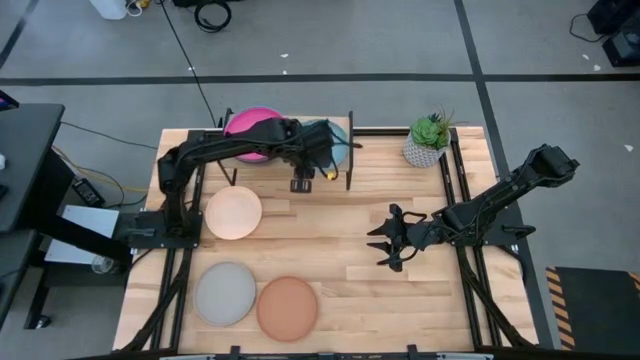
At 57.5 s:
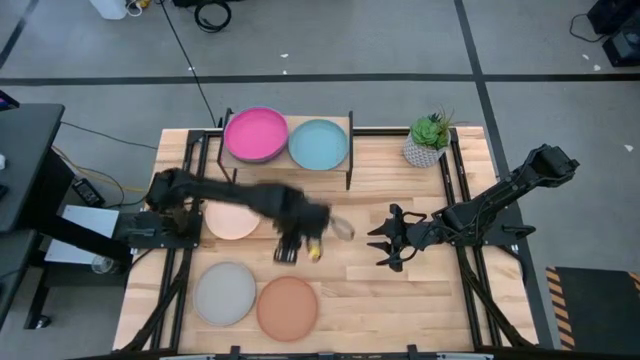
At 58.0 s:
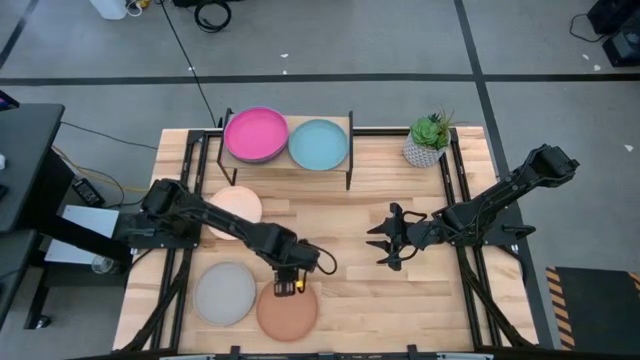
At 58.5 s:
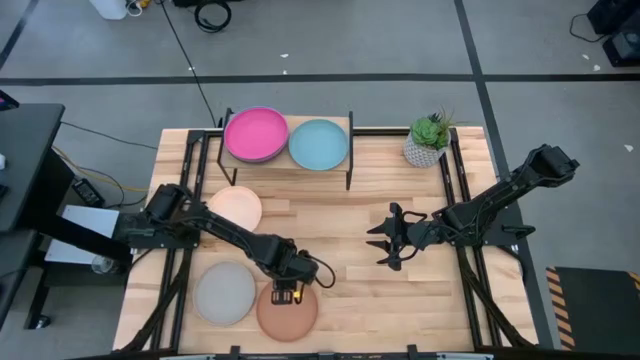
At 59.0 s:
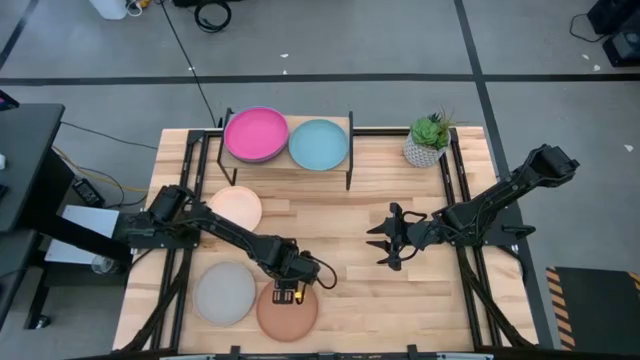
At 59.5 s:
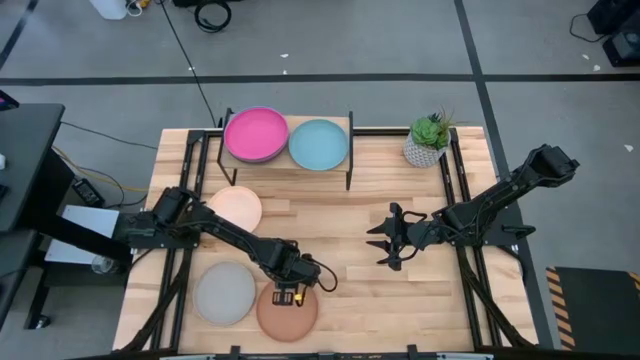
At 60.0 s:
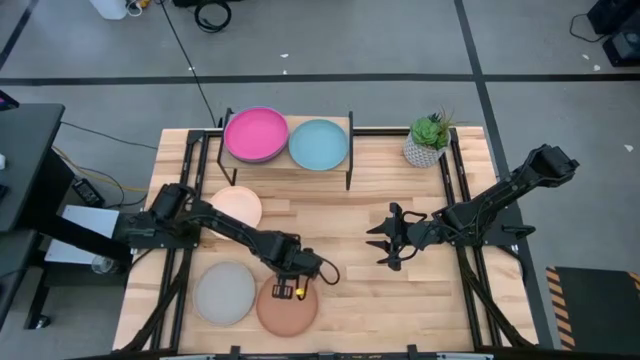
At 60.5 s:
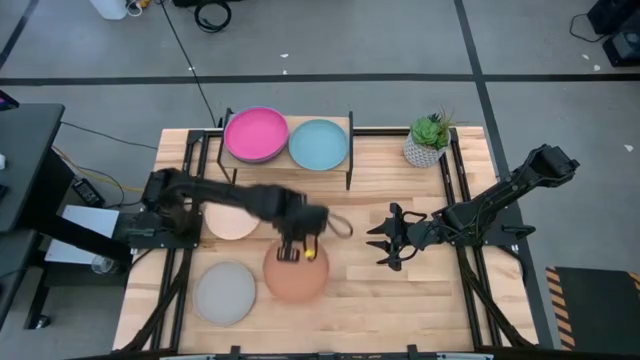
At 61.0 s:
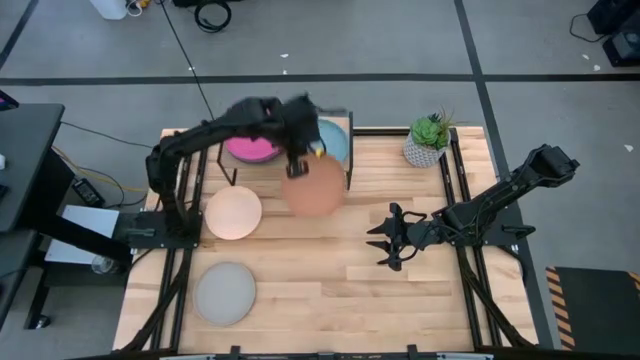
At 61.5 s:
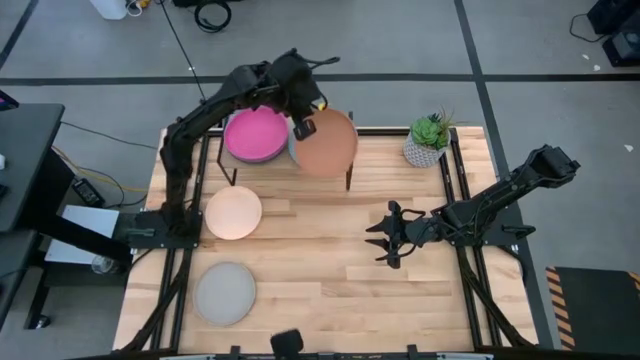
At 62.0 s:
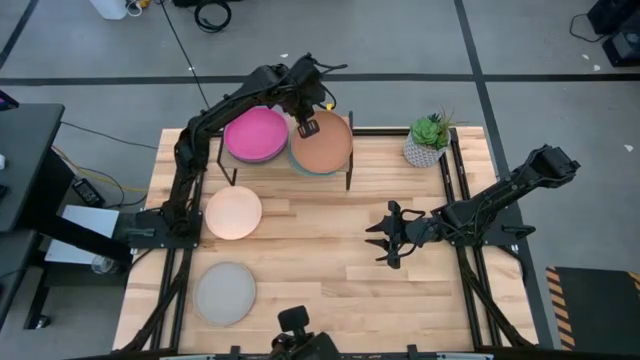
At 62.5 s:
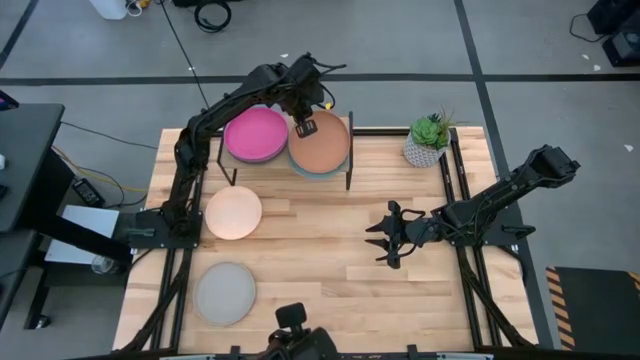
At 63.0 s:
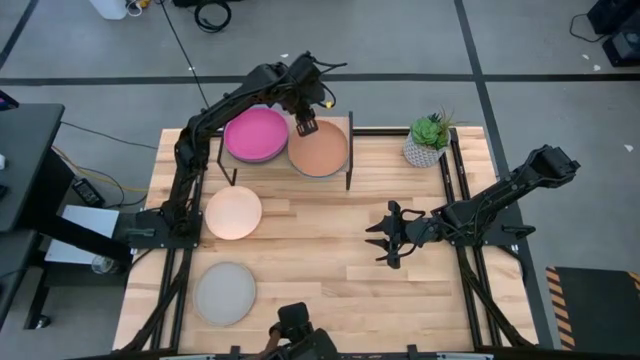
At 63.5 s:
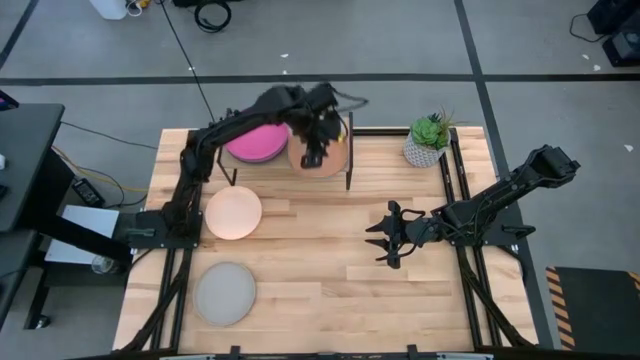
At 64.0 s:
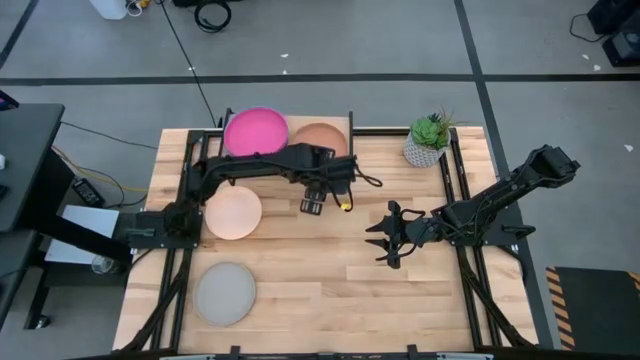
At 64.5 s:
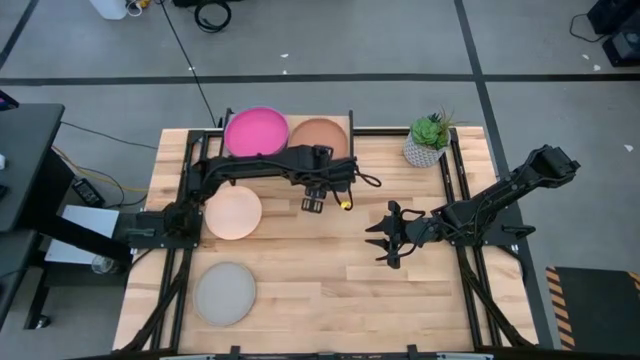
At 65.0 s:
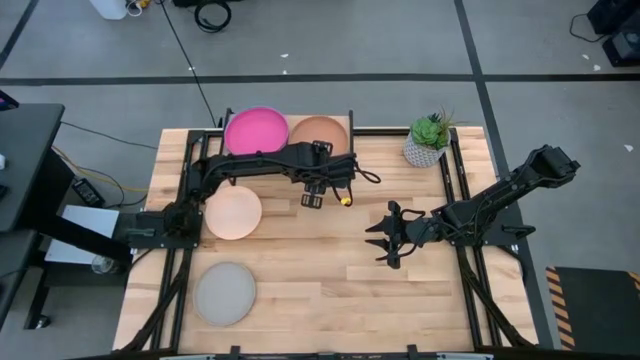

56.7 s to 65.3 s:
Task: Place and stack plates onto a shelf
Stack the brown plate on the light blue plate on the shelf

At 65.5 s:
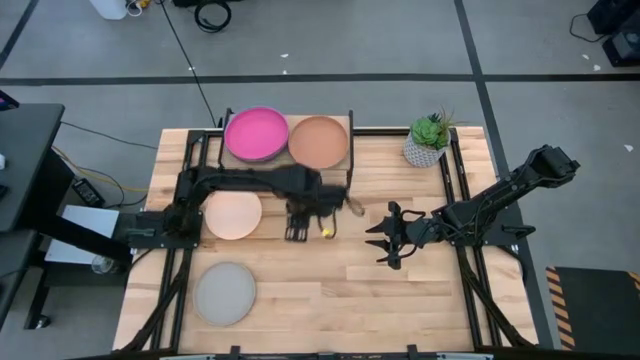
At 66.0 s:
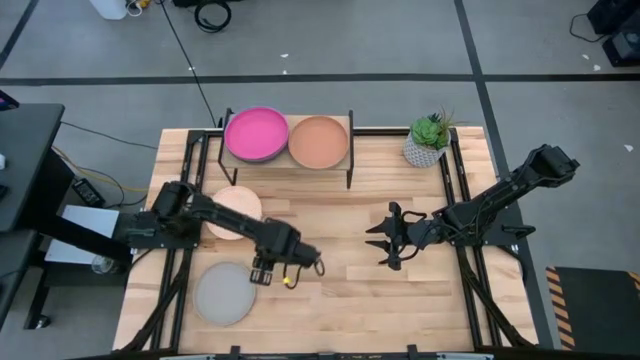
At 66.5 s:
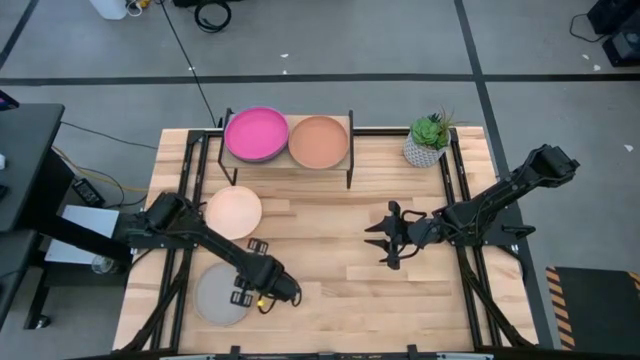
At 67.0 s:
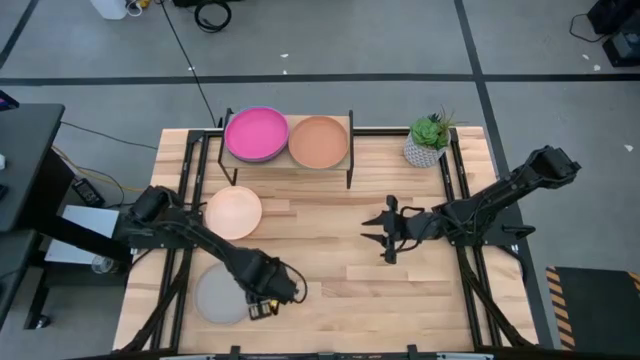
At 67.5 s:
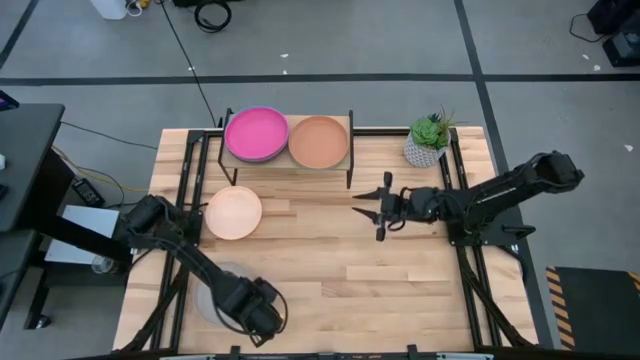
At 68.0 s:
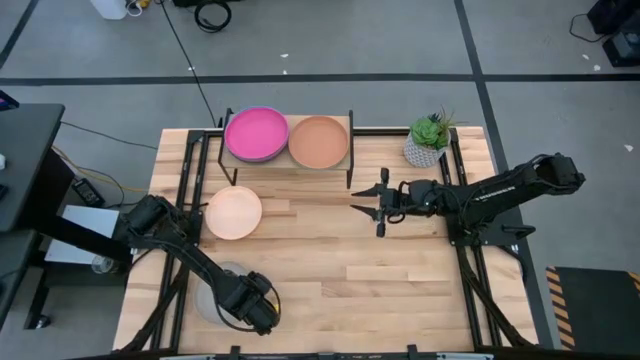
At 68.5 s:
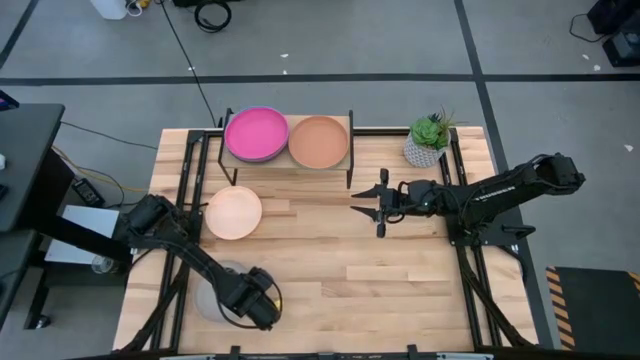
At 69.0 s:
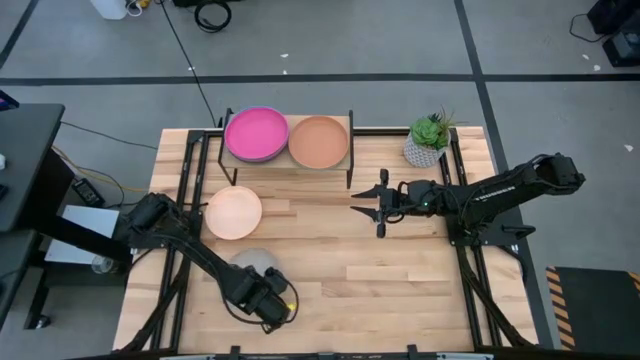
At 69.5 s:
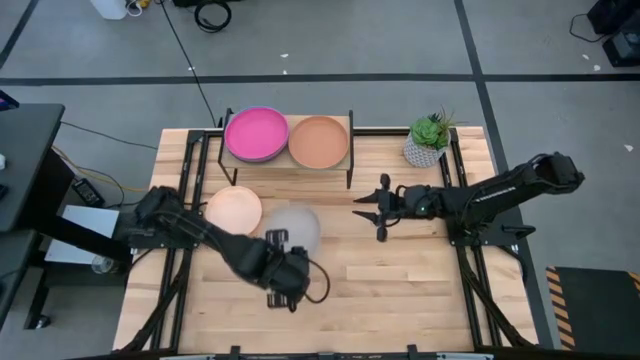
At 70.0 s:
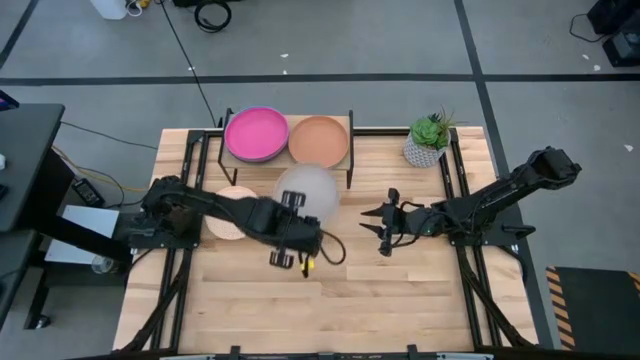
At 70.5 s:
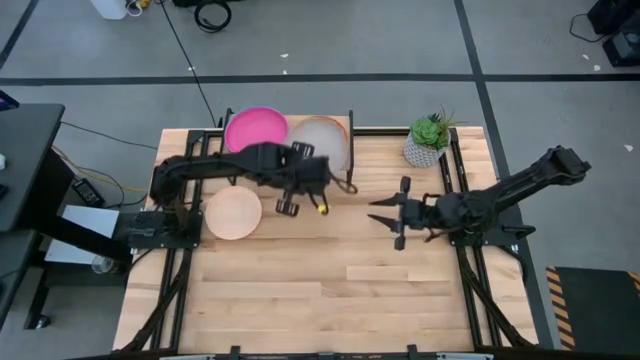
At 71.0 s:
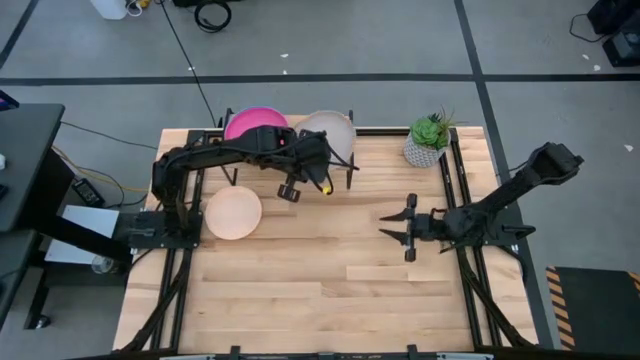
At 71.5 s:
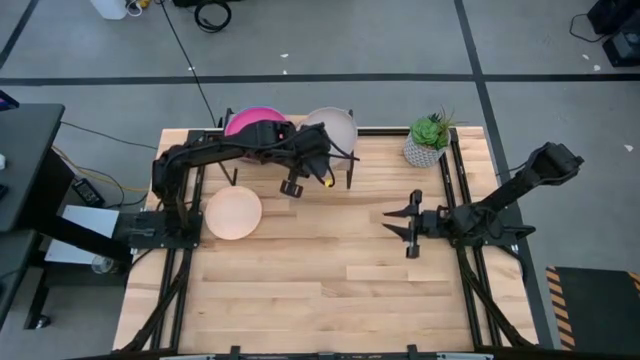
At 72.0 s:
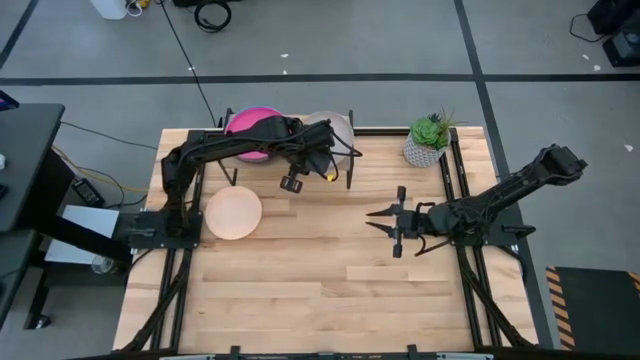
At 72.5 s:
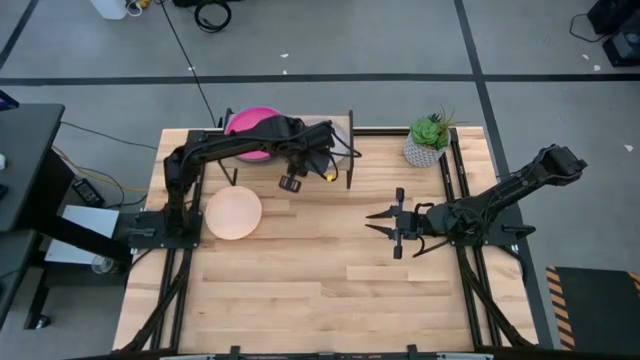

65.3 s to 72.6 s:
Stack the gray plate on the brown plate on the shelf

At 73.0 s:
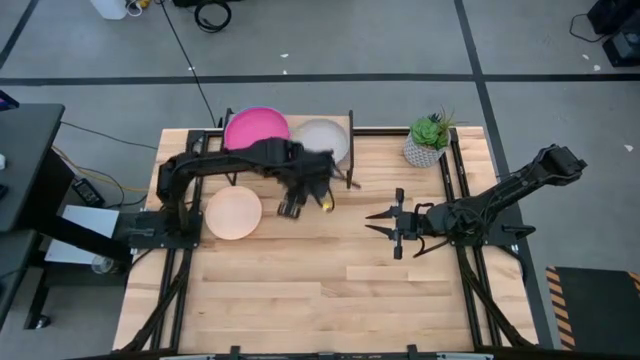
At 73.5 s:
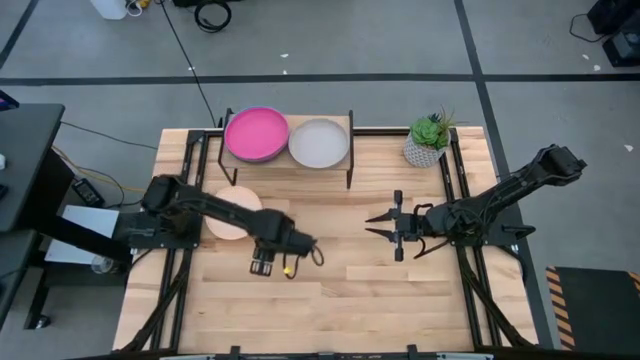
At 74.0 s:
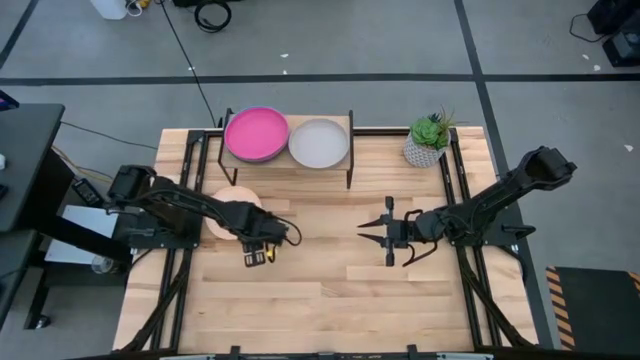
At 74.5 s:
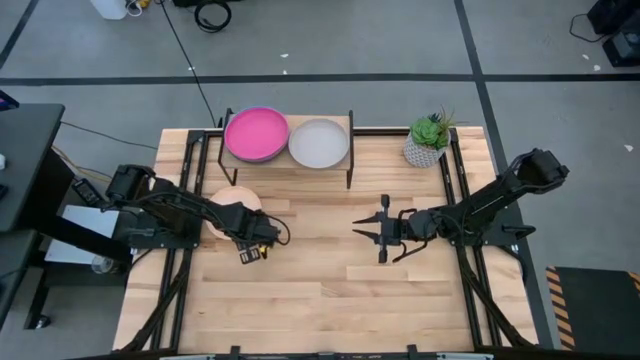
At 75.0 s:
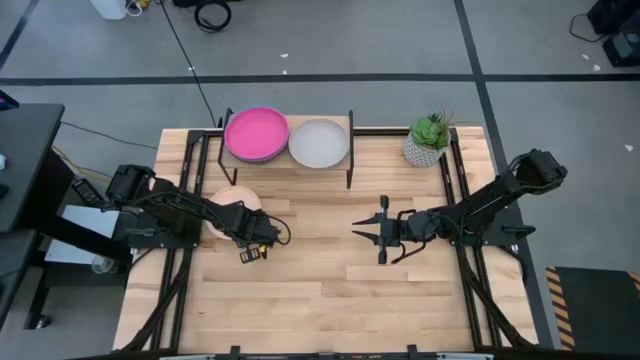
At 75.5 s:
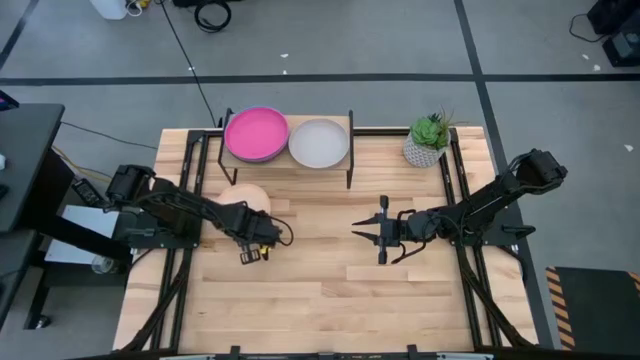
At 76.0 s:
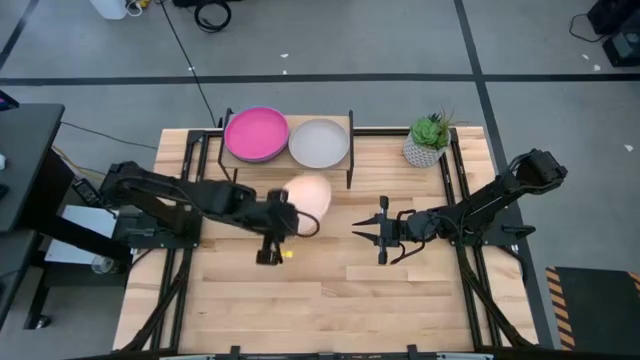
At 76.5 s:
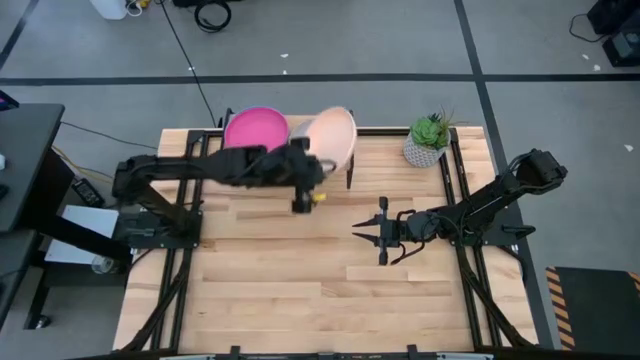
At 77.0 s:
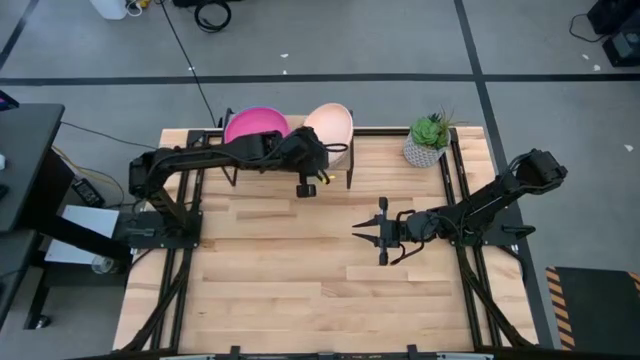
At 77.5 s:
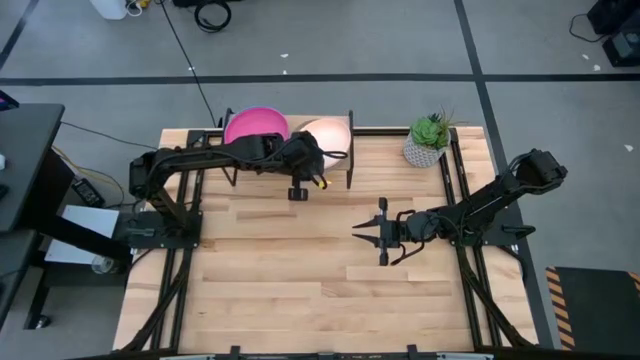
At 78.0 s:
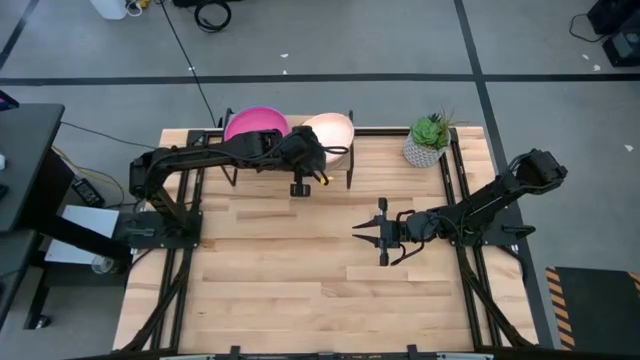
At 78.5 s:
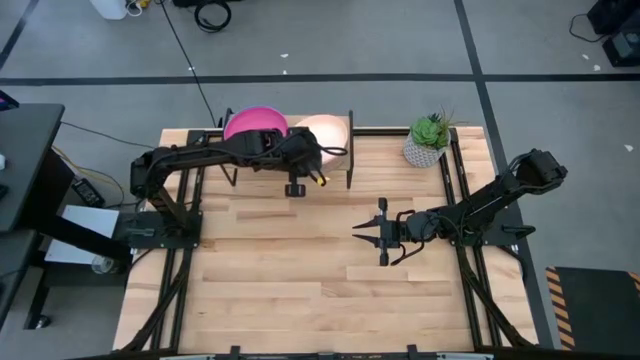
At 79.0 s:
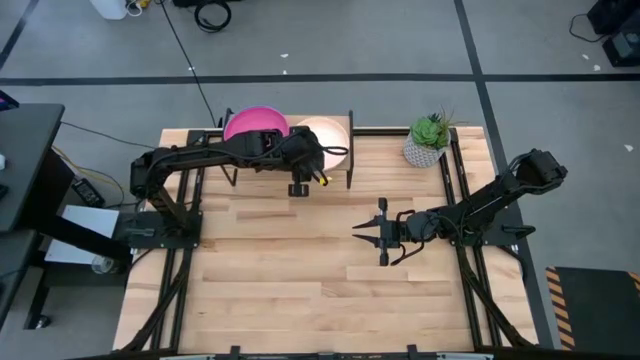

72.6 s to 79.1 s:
Stack the light brown plate on the gray plate on the shelf
